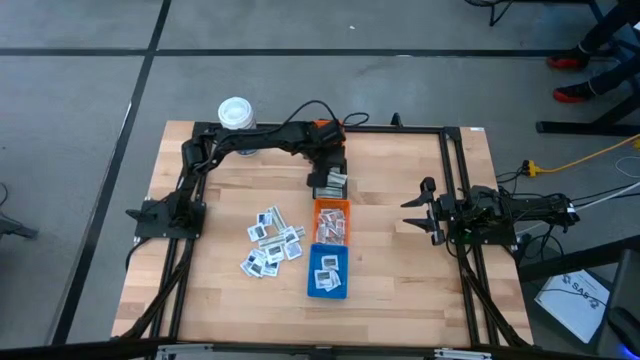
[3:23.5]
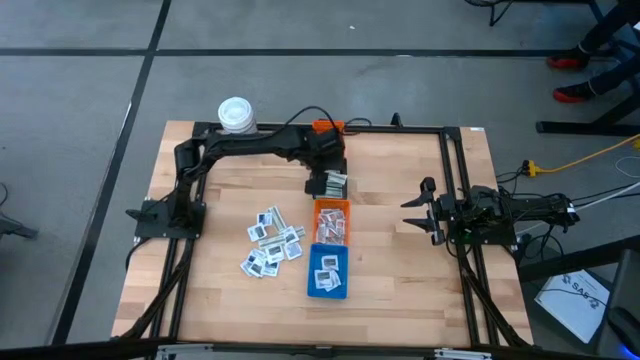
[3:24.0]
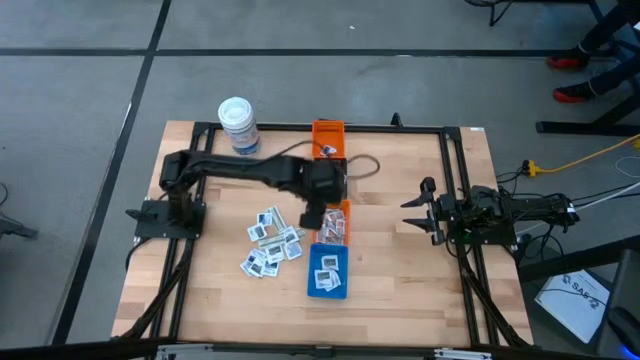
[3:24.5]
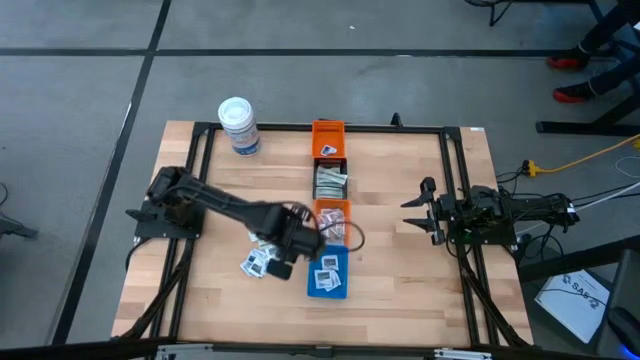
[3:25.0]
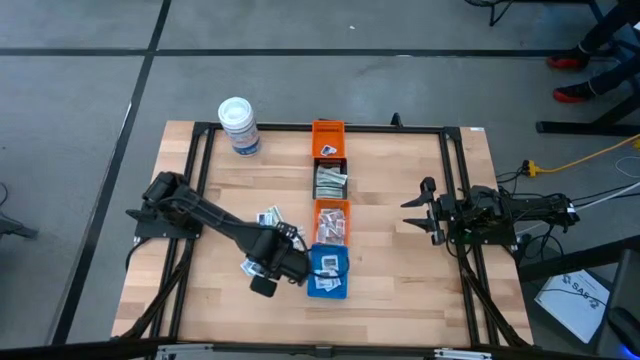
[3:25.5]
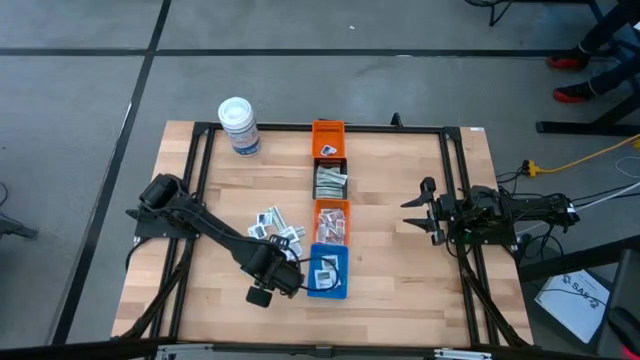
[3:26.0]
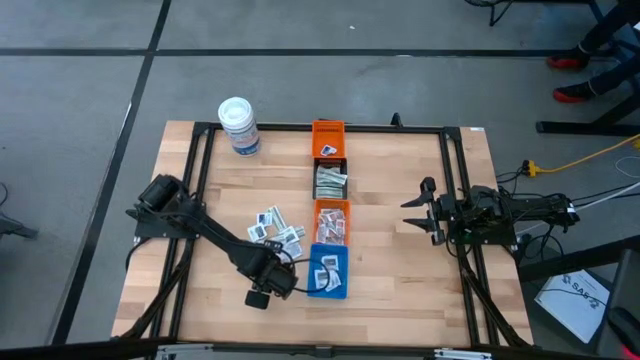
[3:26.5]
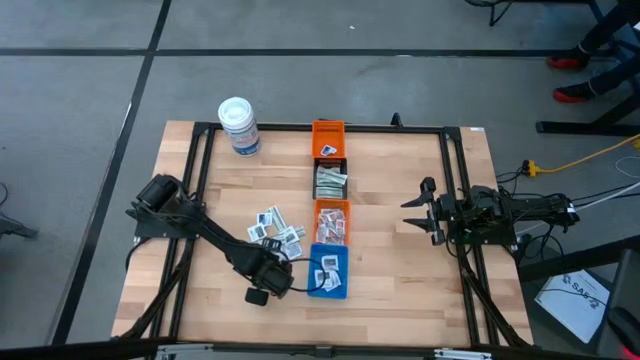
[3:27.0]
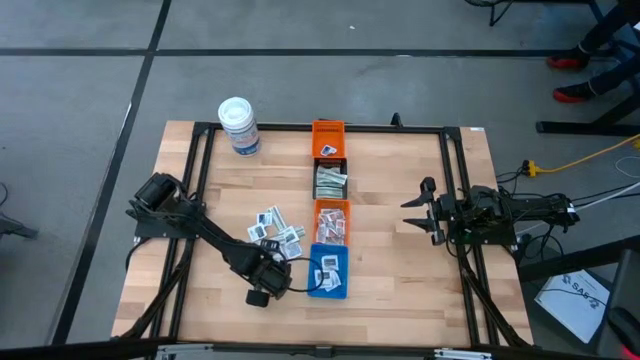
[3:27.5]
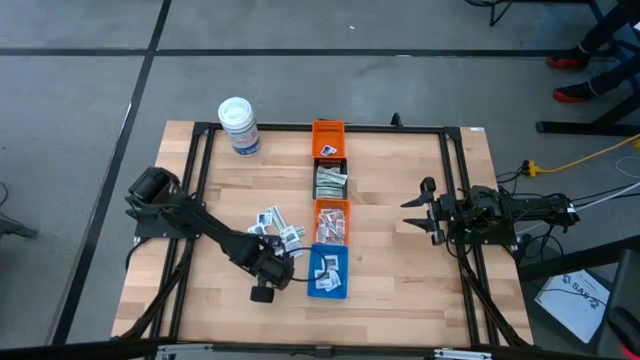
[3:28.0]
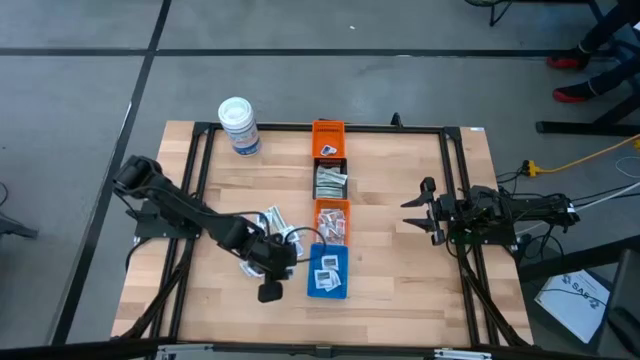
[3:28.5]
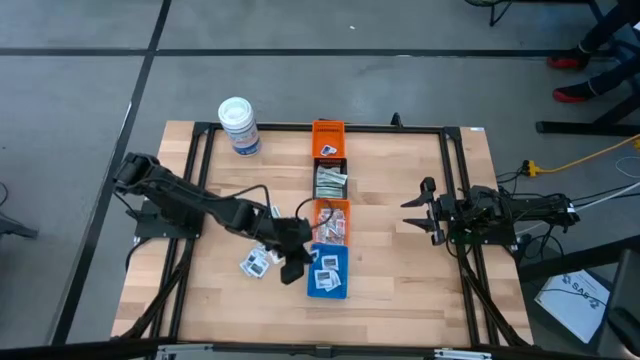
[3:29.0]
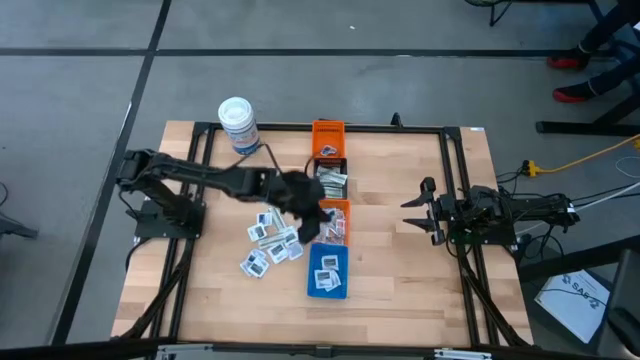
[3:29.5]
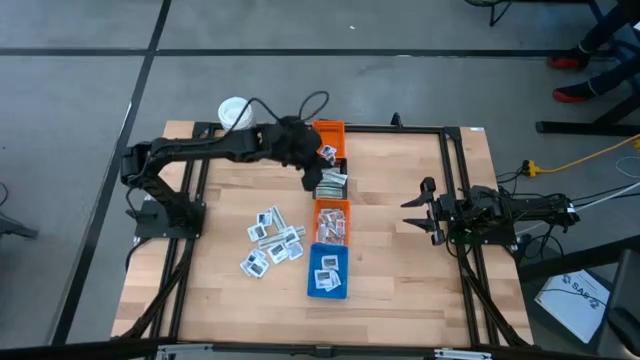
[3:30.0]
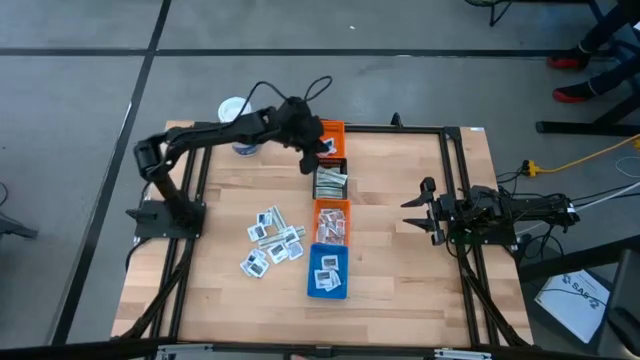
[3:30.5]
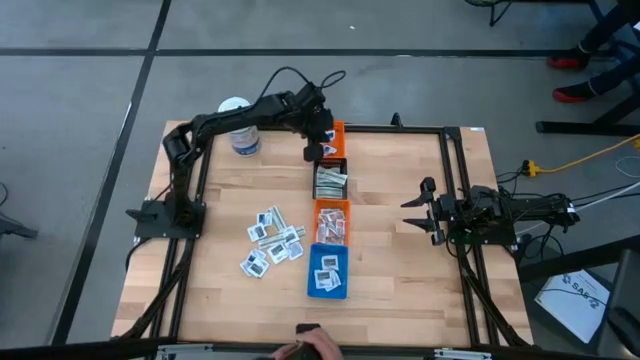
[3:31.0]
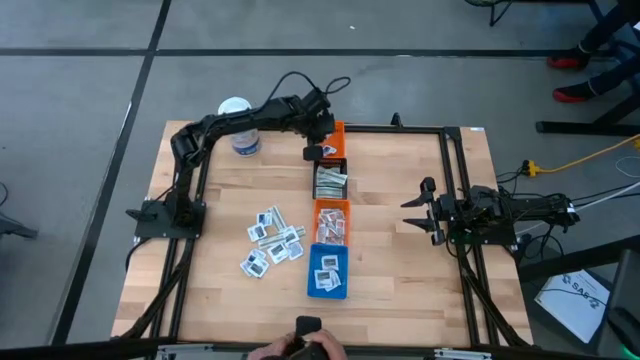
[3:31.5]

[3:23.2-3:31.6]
Task: Pick & Place First Aid Supplies
Put the blue alcohol pad into the top orange bin

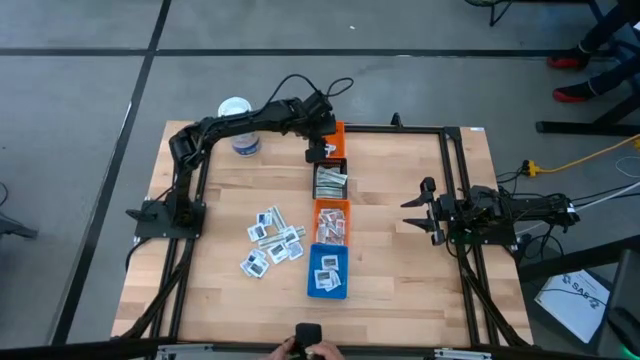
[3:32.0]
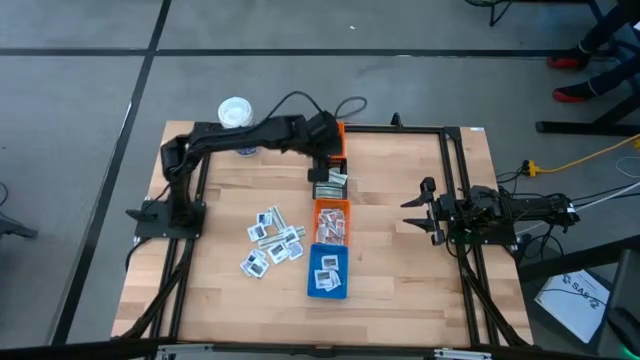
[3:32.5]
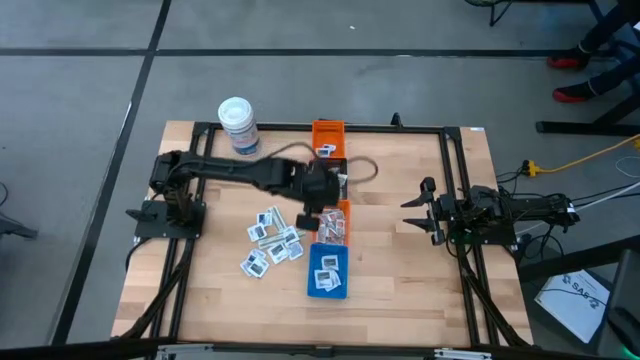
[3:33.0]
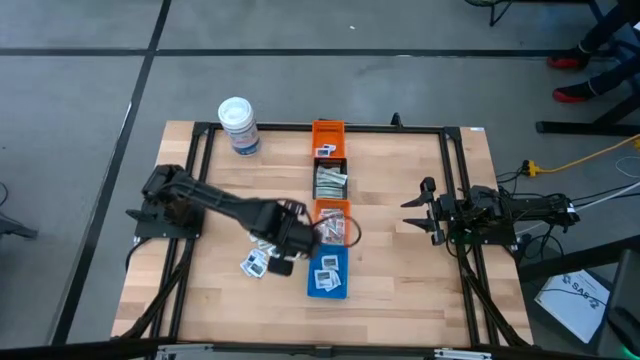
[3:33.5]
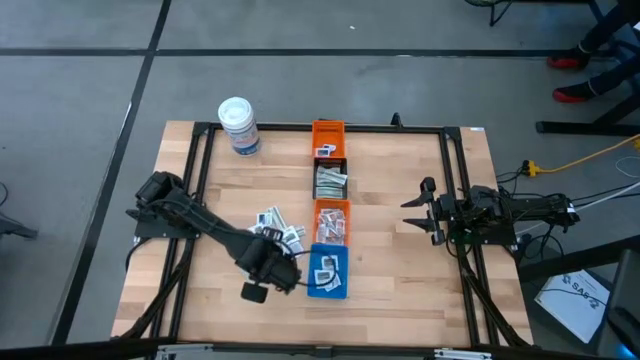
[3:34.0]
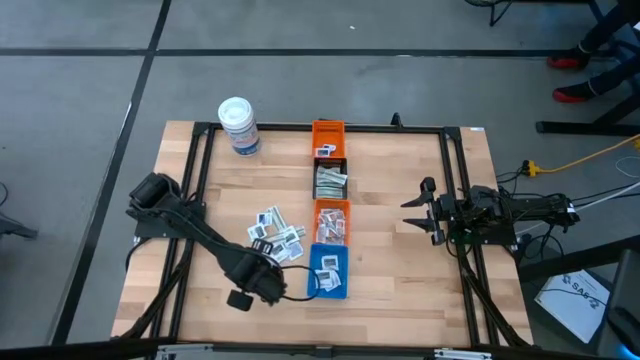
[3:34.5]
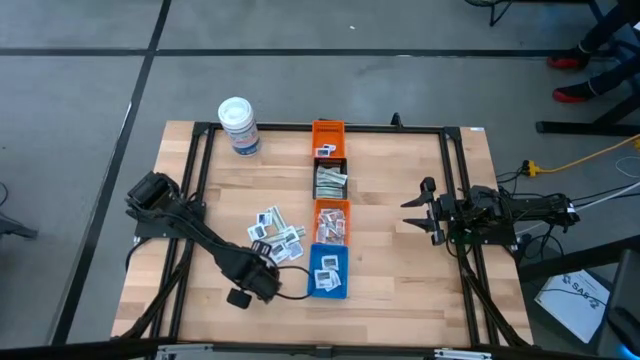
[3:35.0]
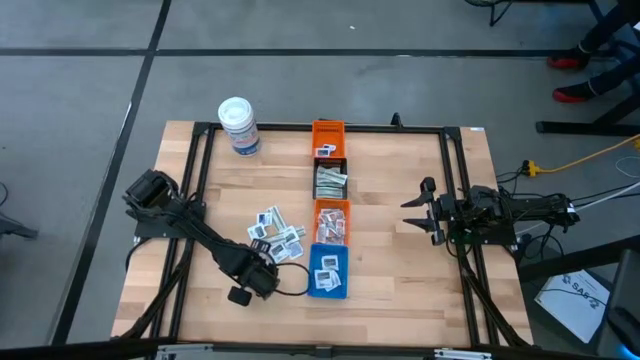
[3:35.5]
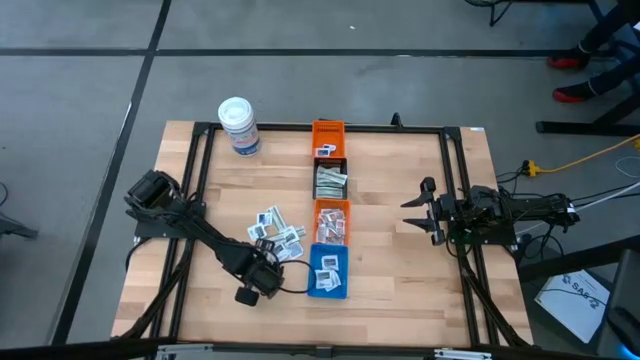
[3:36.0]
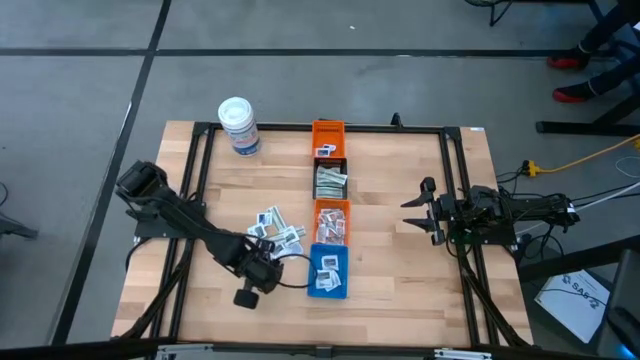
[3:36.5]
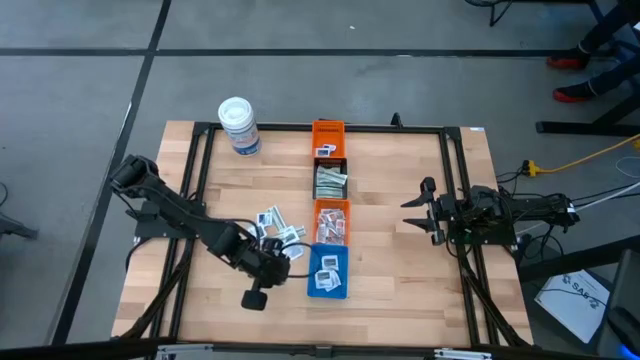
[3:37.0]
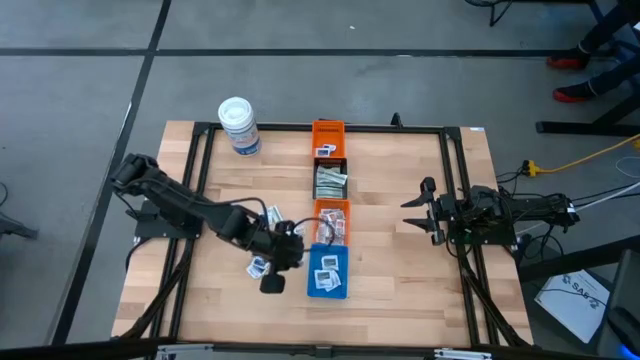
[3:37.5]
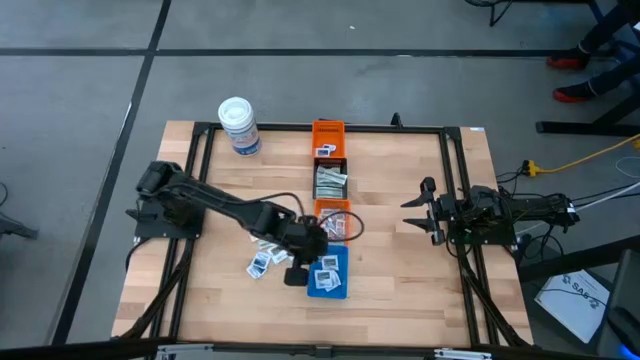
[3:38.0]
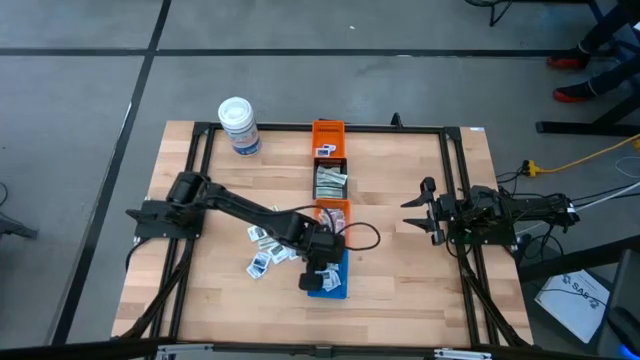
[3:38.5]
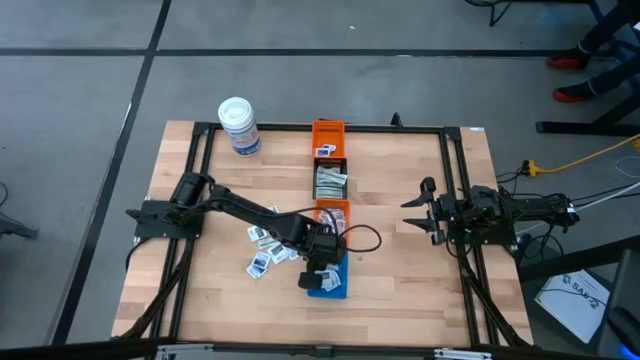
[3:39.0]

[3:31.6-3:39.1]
Put the gray towelette pack into the blue bin

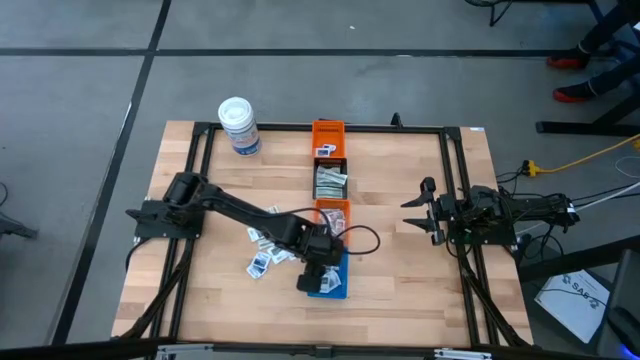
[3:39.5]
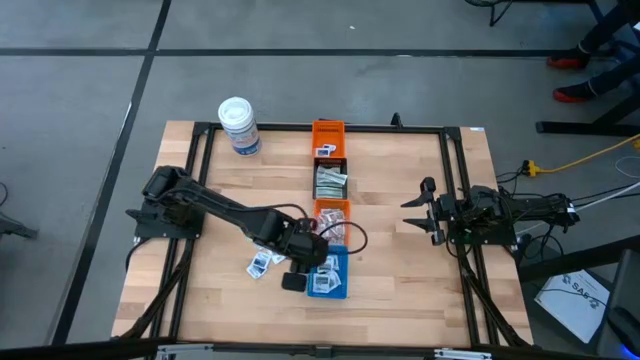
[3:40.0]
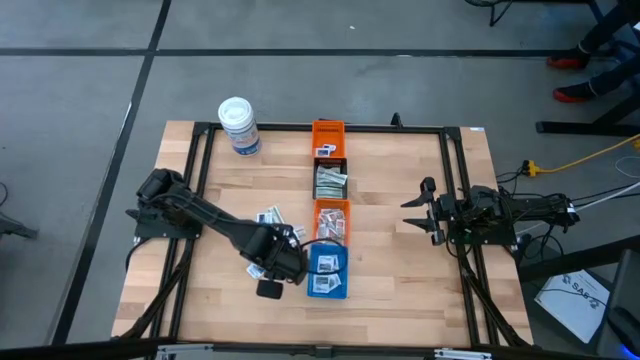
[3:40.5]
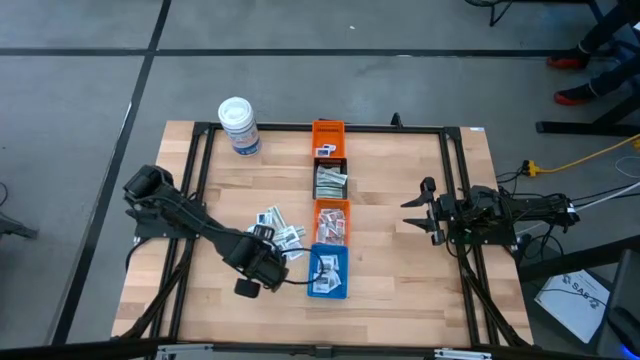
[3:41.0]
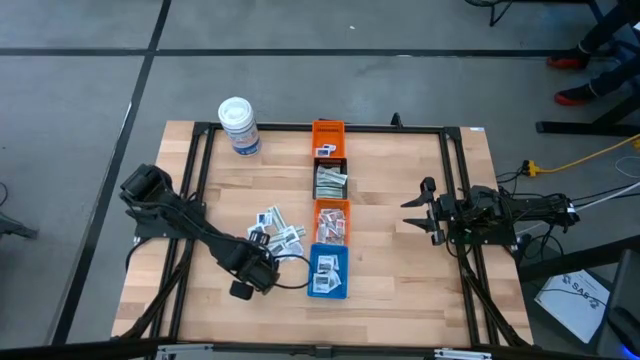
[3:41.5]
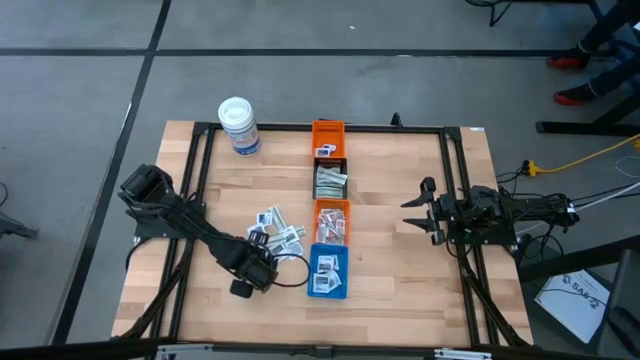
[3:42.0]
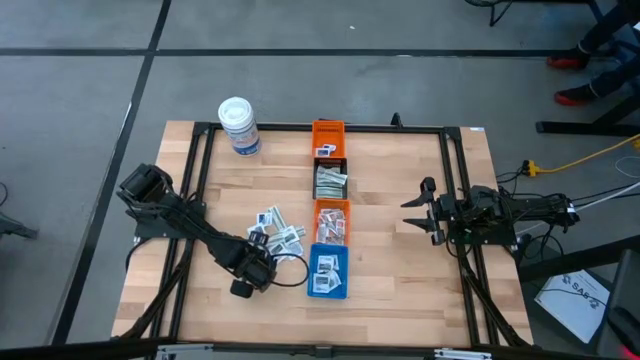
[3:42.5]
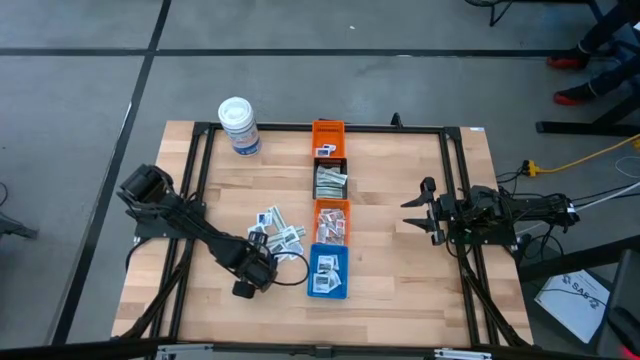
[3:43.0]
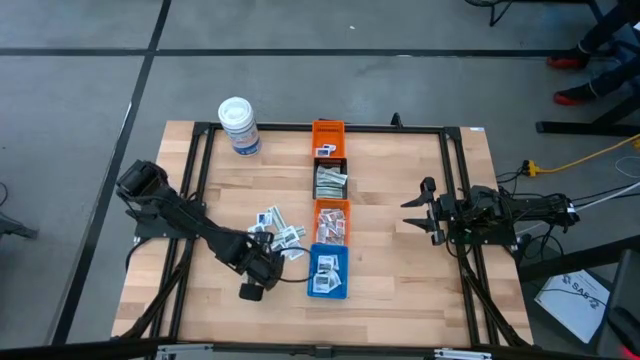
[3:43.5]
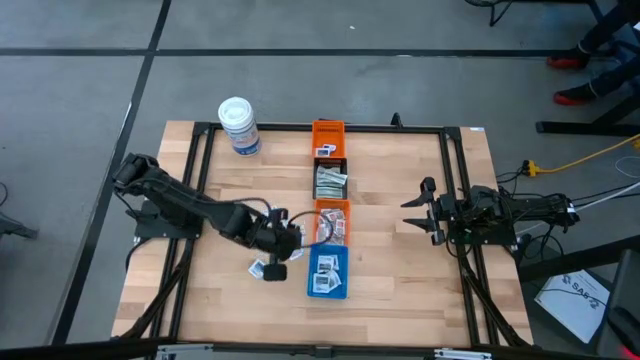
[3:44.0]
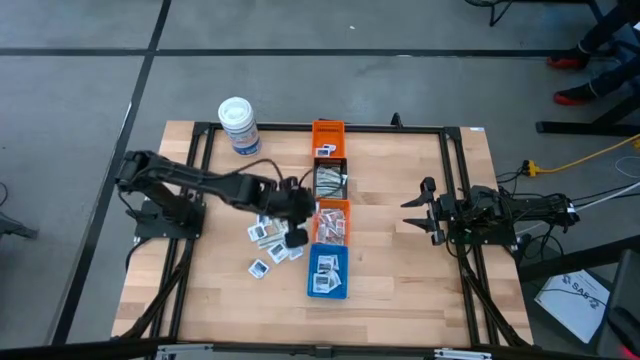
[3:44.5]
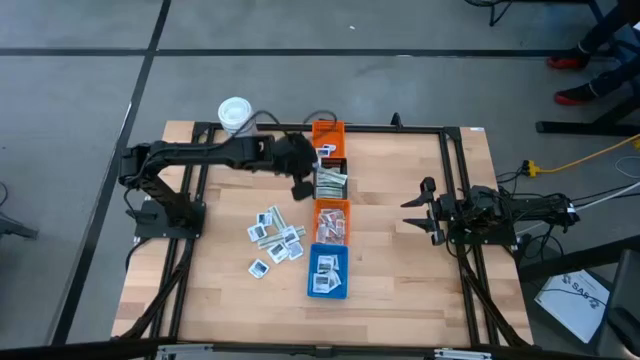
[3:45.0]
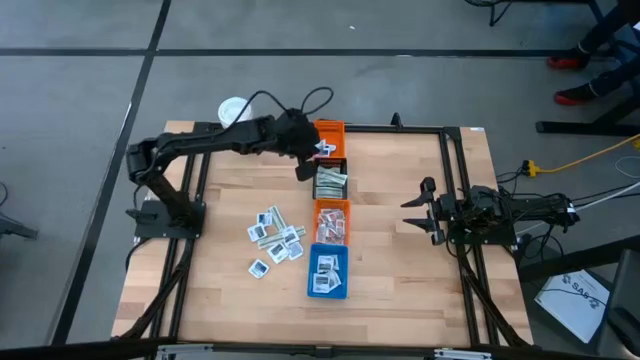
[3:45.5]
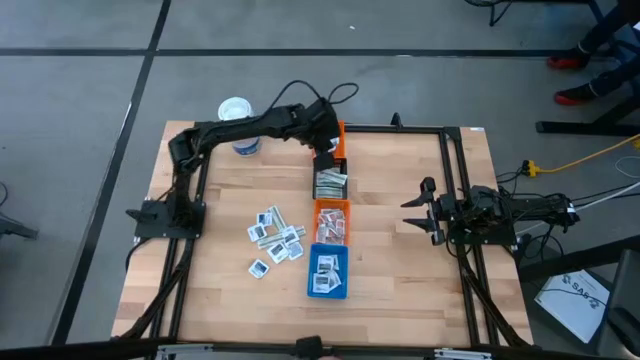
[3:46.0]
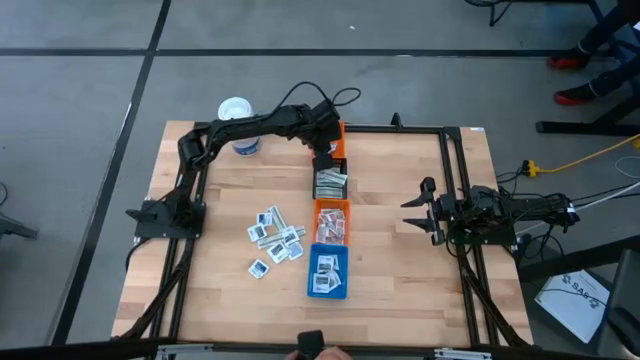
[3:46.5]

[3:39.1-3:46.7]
Put the blue alcohol pad into the top orange bin
